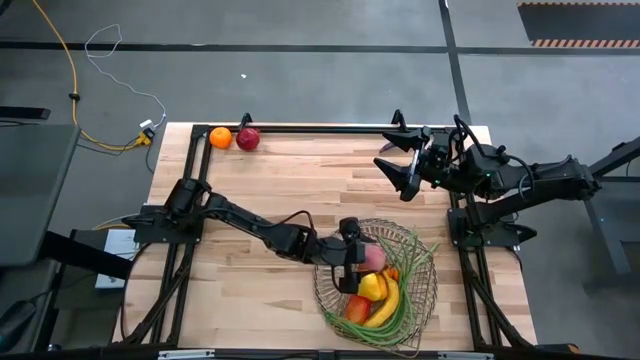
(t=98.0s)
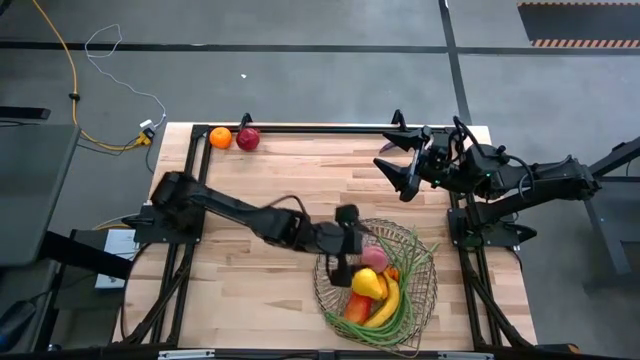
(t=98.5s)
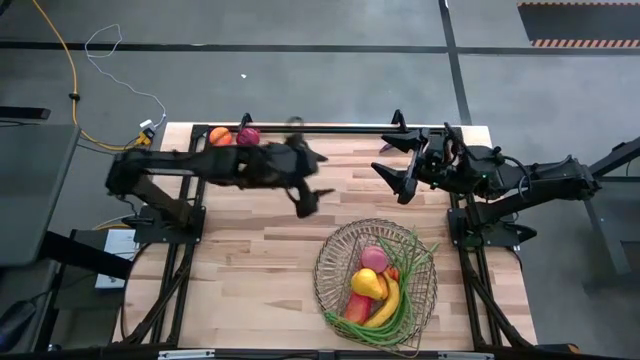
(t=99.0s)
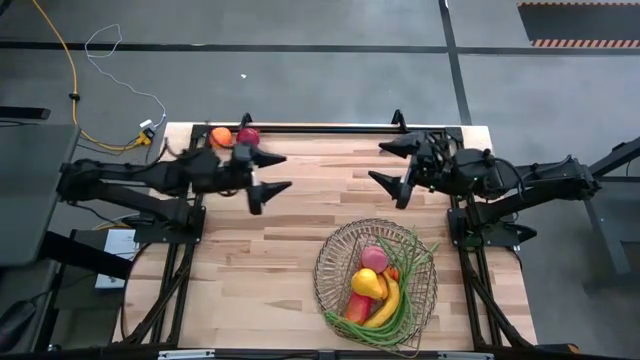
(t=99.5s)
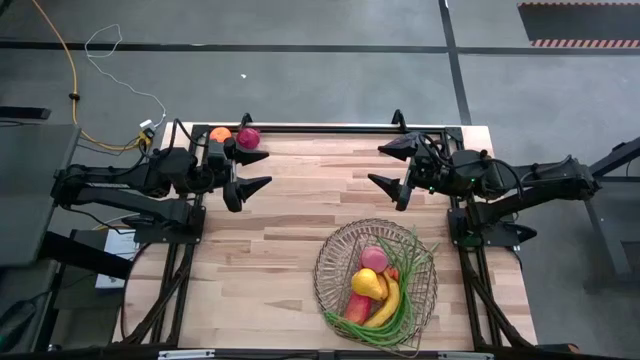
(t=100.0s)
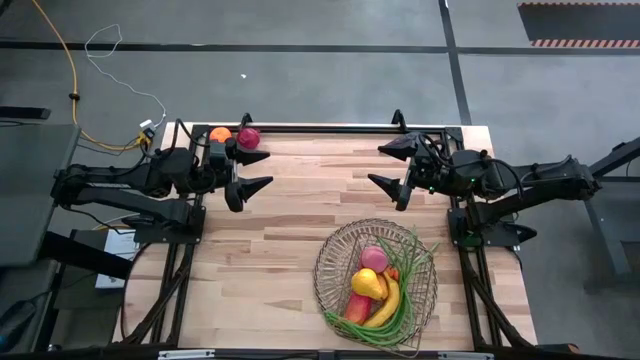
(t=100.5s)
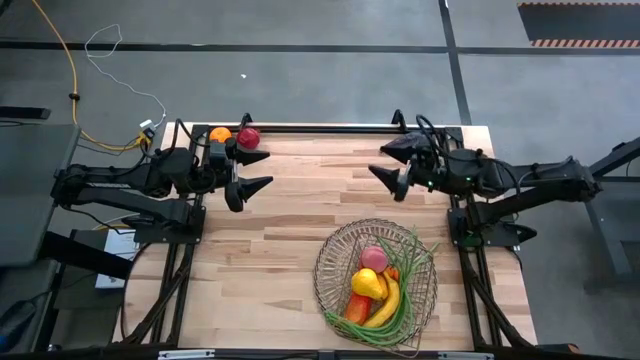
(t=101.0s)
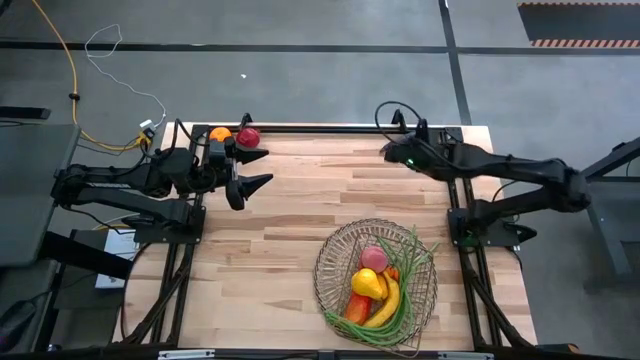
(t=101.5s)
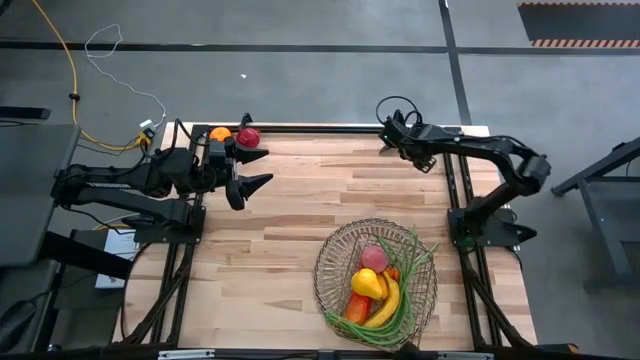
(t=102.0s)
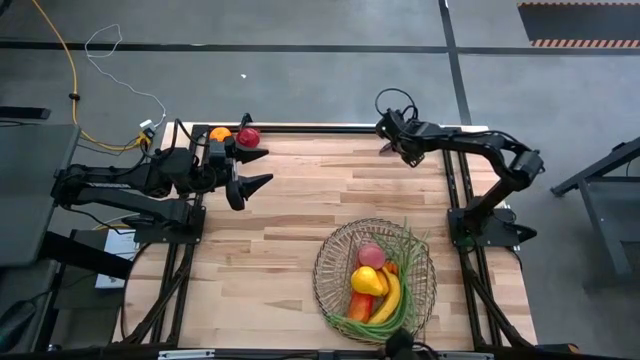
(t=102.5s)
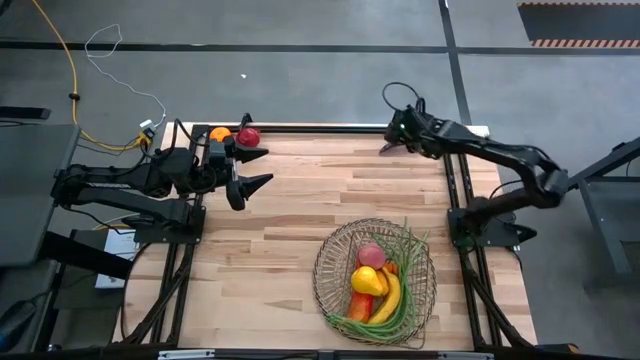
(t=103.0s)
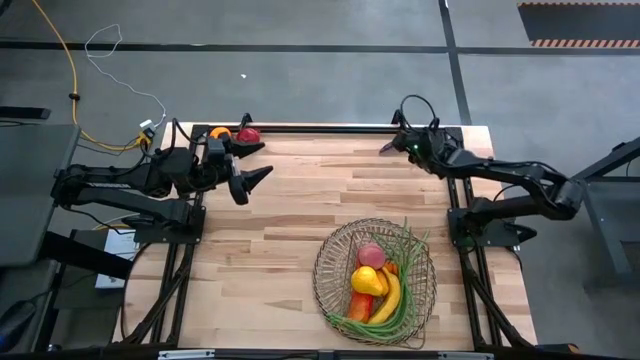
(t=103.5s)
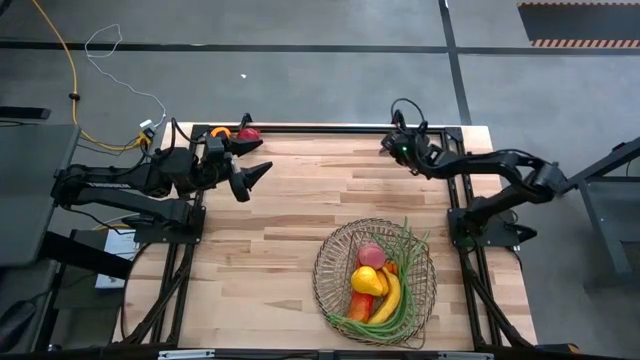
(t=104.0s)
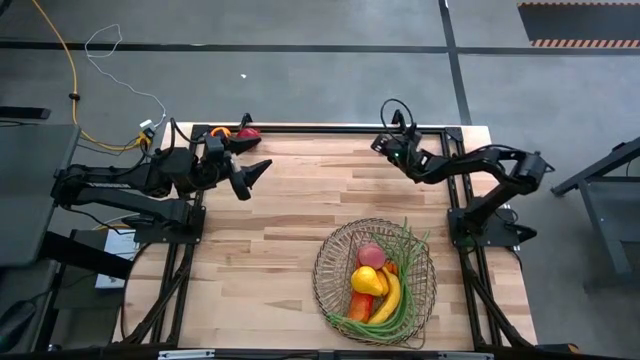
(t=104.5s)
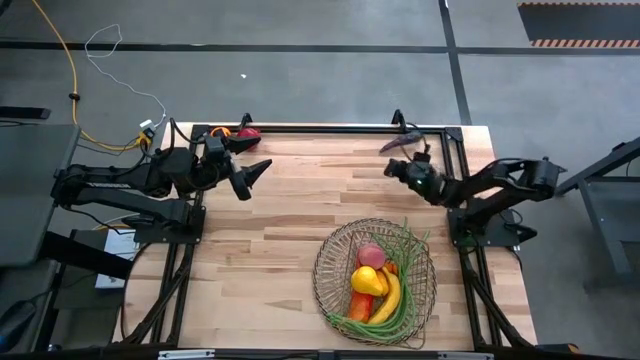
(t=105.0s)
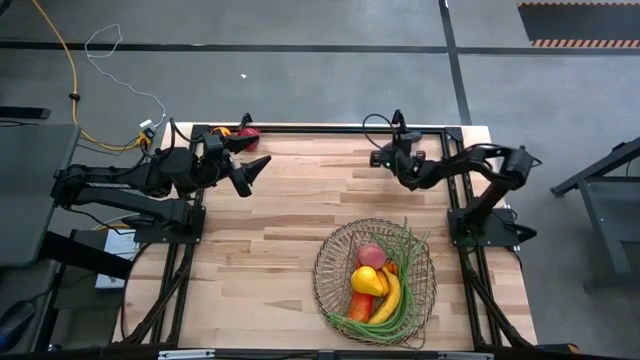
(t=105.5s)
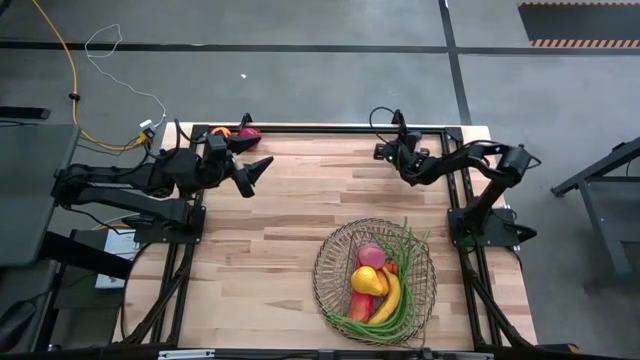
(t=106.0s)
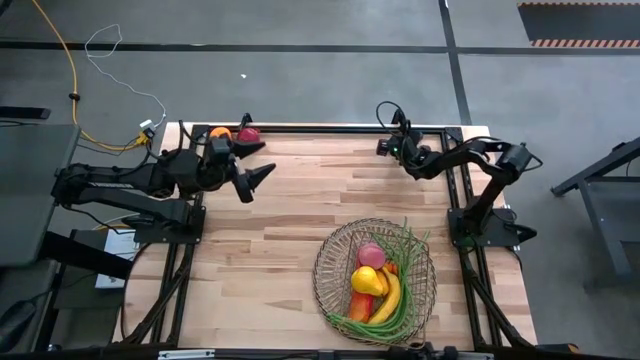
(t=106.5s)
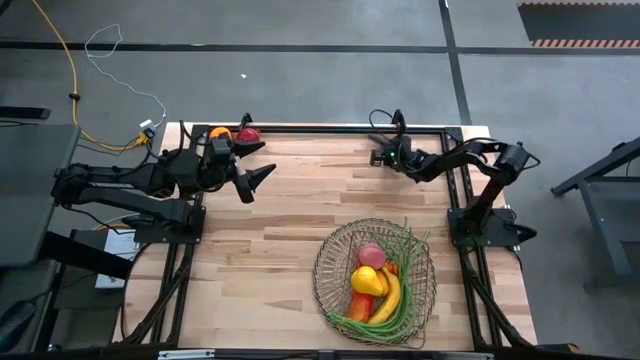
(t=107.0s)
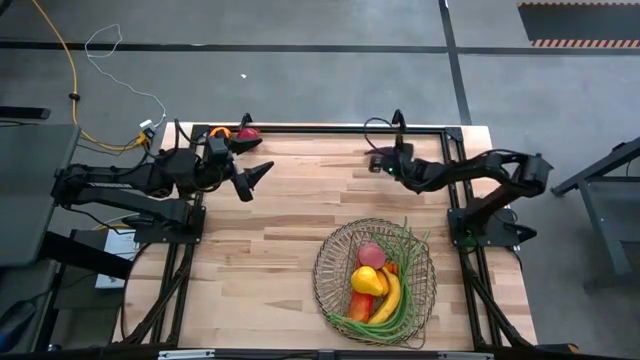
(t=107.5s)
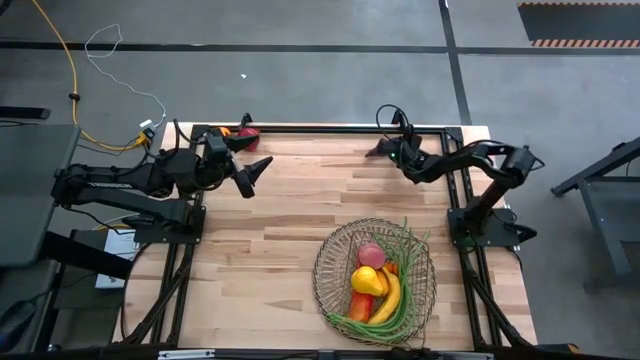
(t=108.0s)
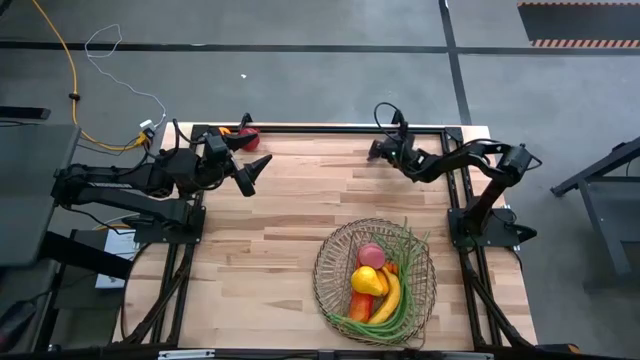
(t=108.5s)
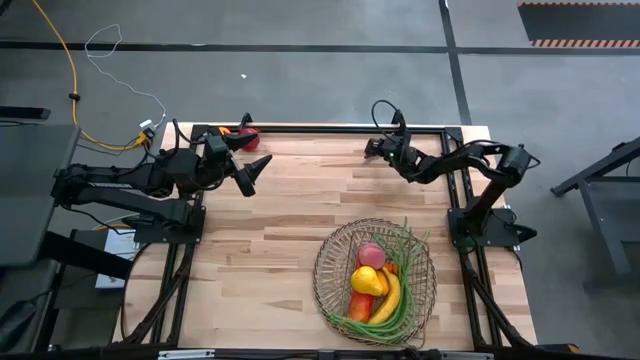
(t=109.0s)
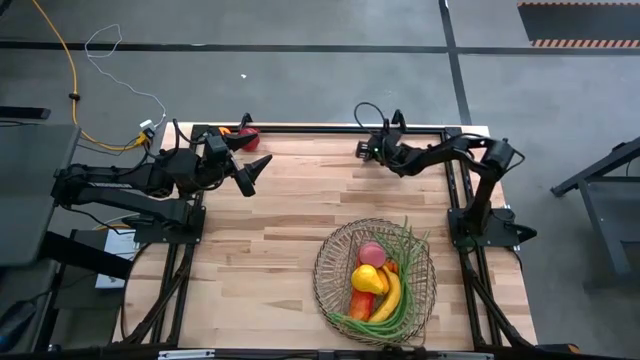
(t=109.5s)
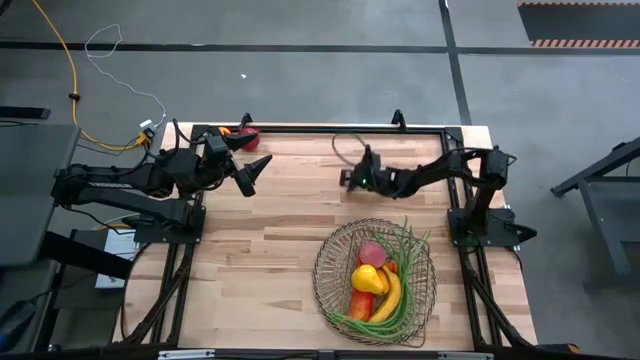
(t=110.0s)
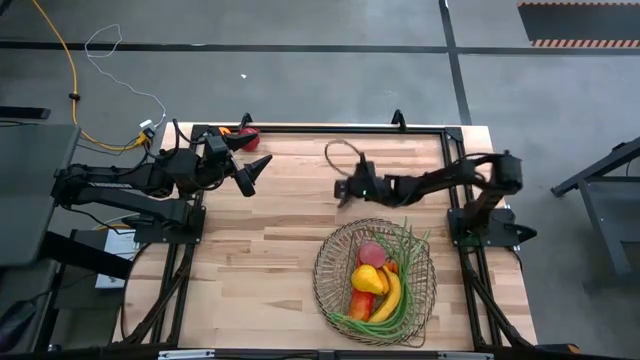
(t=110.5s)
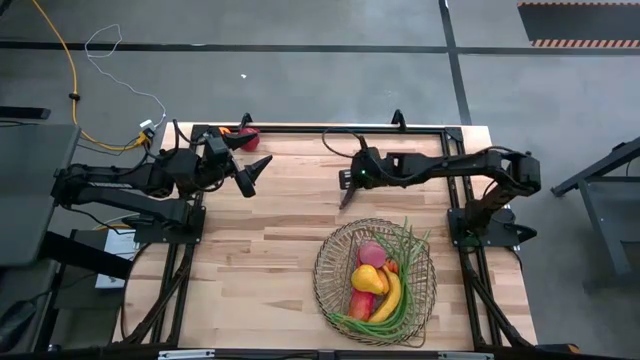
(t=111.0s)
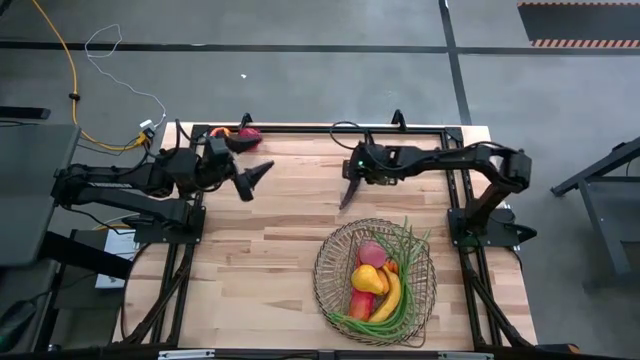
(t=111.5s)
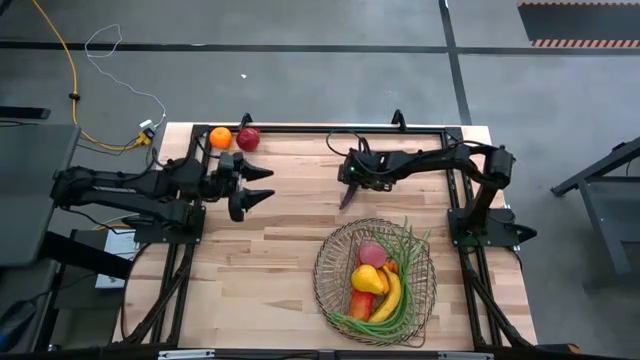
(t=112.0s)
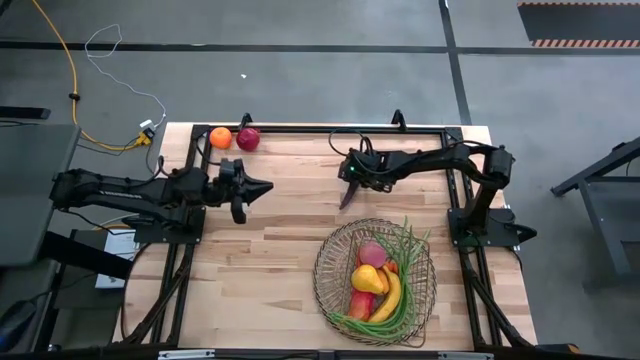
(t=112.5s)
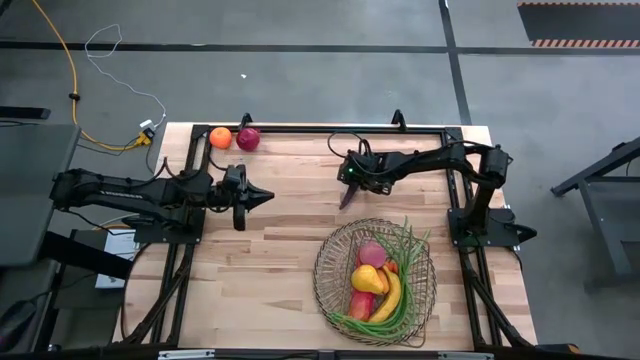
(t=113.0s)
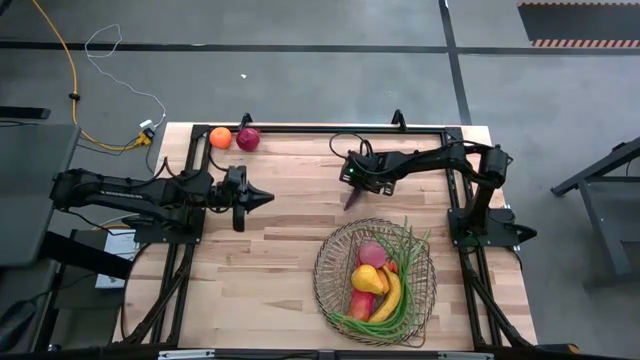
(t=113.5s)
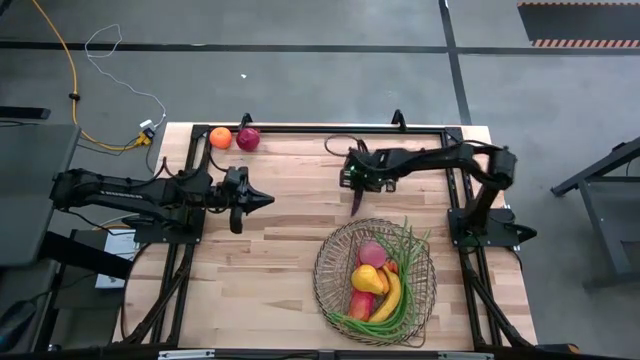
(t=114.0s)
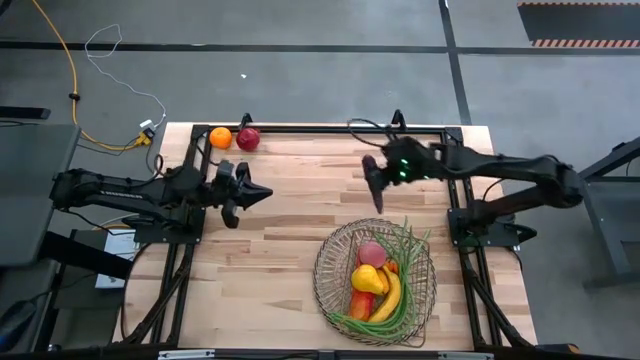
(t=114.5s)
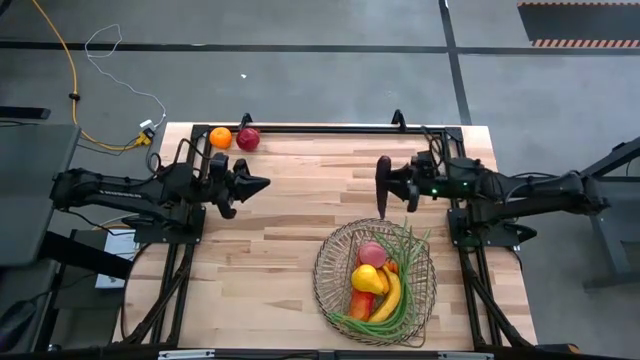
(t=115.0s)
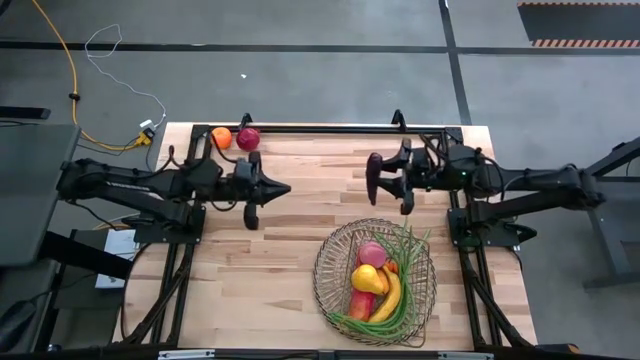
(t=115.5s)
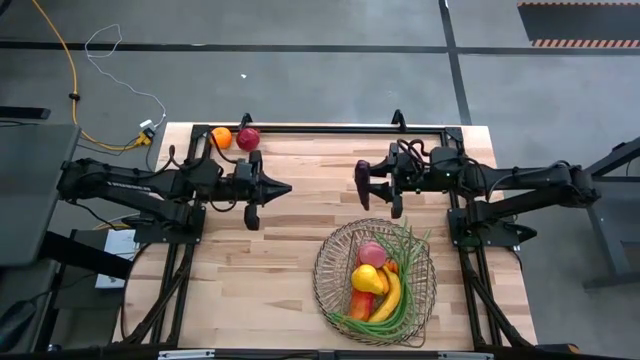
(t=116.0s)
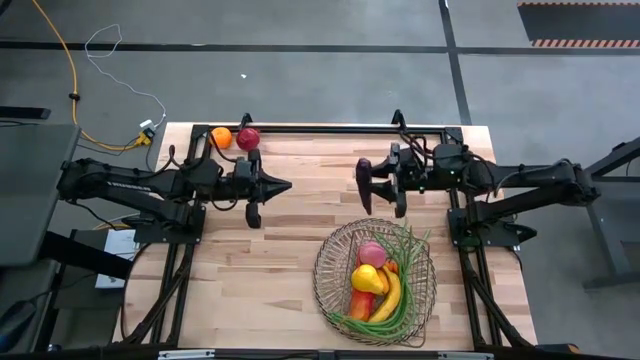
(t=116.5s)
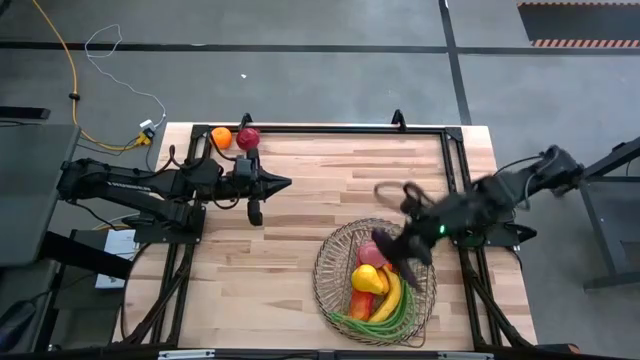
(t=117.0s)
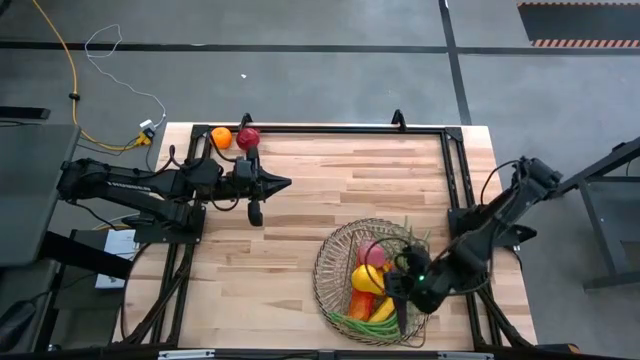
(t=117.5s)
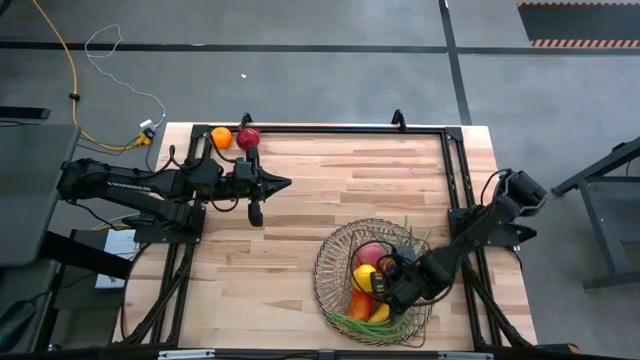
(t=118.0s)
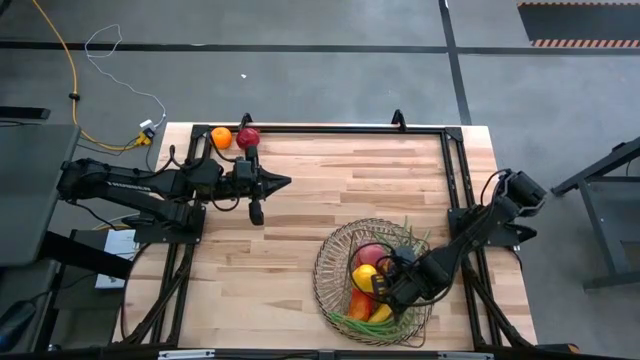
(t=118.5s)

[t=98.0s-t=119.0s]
Task: Build produce basket
Put the eggplant into the wire basket
